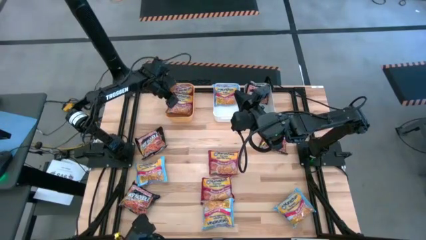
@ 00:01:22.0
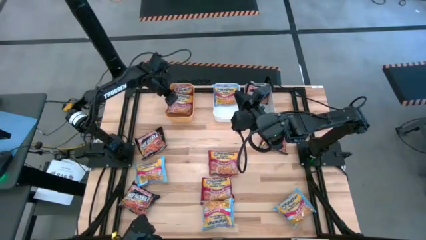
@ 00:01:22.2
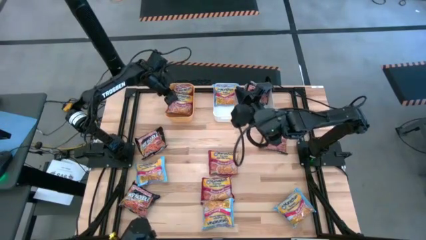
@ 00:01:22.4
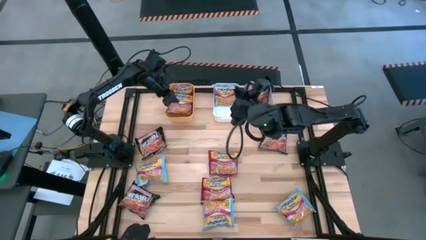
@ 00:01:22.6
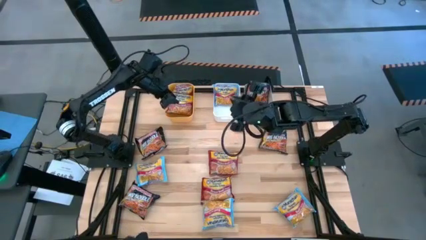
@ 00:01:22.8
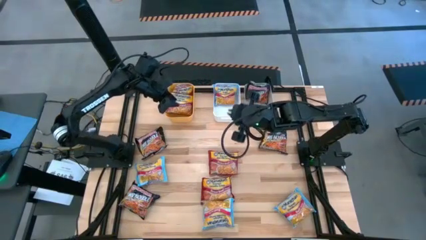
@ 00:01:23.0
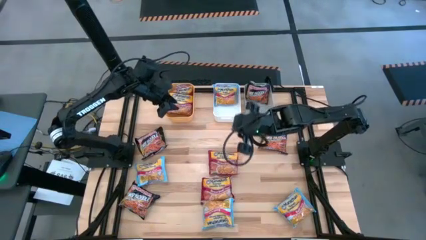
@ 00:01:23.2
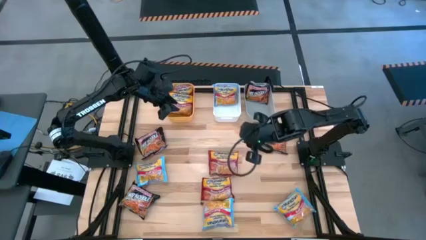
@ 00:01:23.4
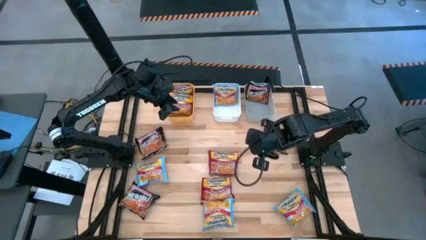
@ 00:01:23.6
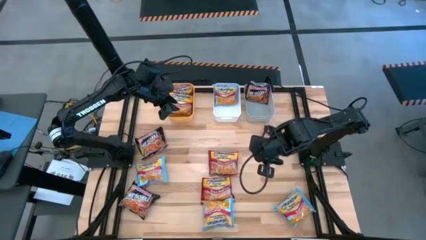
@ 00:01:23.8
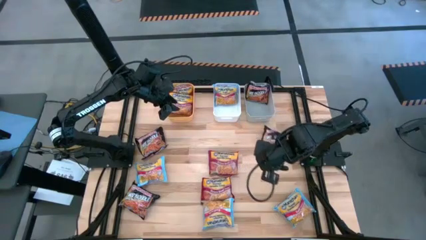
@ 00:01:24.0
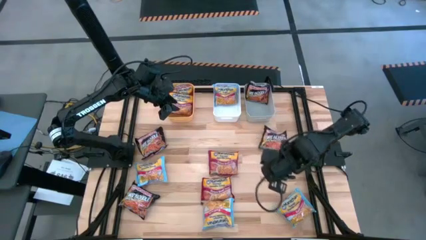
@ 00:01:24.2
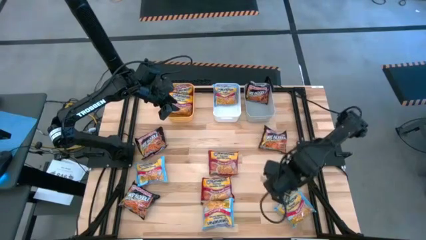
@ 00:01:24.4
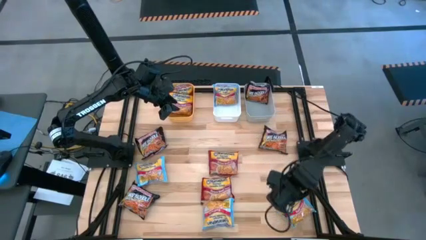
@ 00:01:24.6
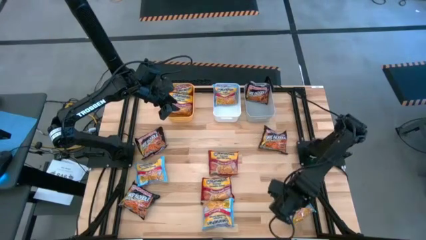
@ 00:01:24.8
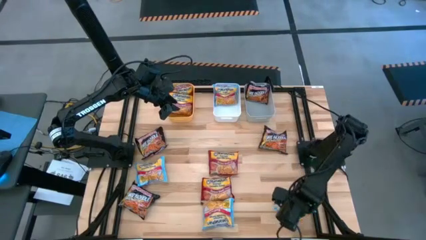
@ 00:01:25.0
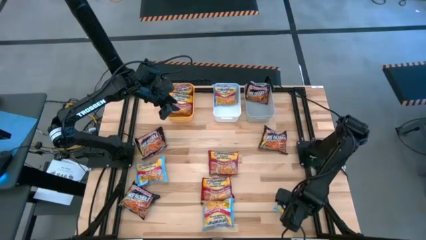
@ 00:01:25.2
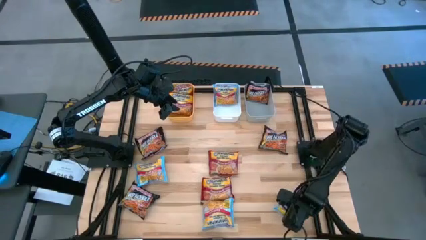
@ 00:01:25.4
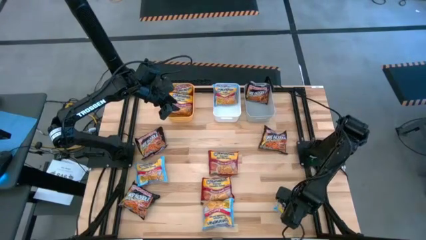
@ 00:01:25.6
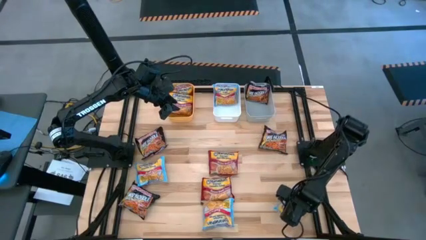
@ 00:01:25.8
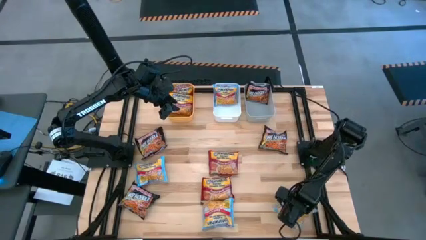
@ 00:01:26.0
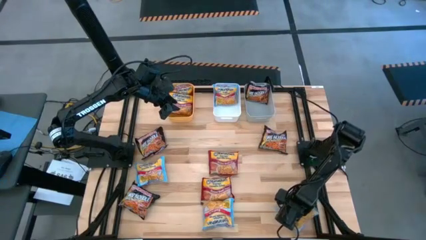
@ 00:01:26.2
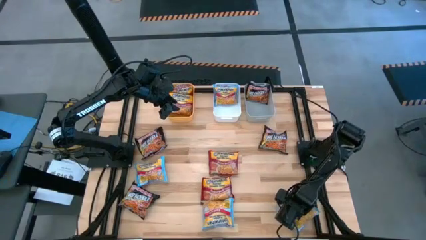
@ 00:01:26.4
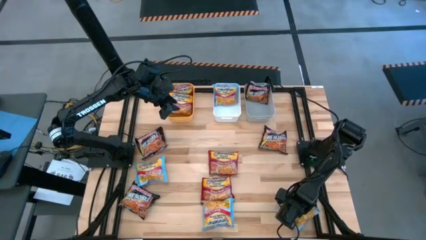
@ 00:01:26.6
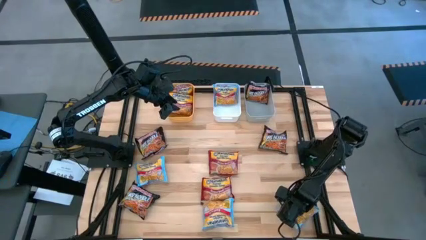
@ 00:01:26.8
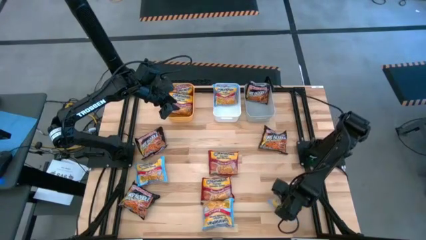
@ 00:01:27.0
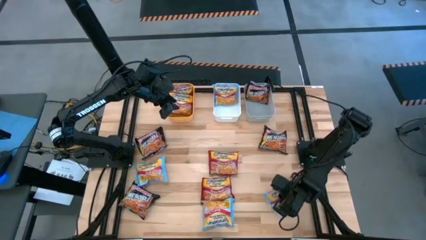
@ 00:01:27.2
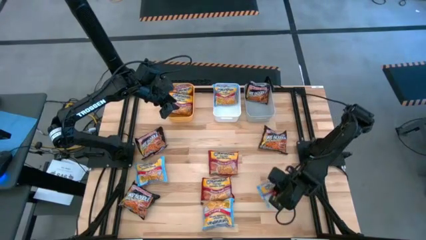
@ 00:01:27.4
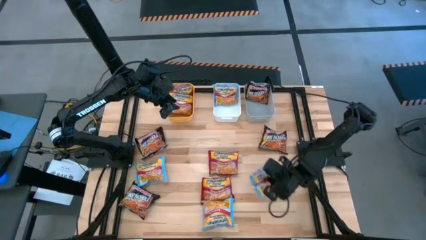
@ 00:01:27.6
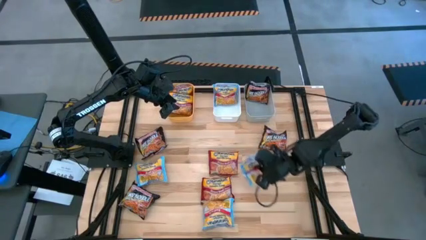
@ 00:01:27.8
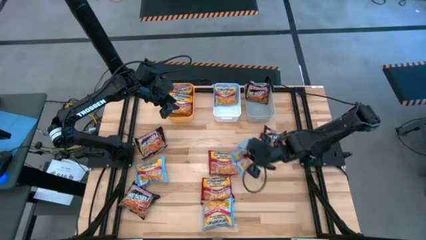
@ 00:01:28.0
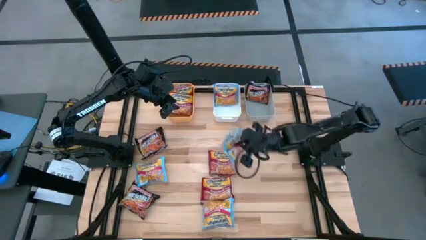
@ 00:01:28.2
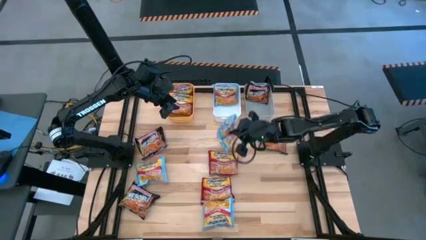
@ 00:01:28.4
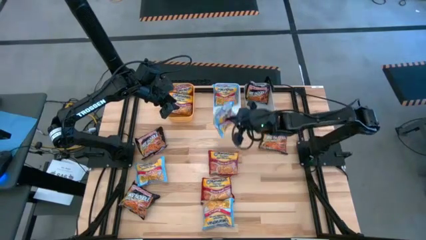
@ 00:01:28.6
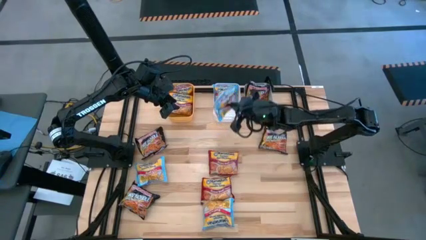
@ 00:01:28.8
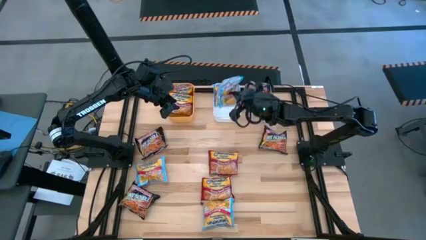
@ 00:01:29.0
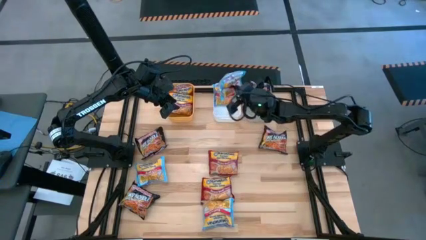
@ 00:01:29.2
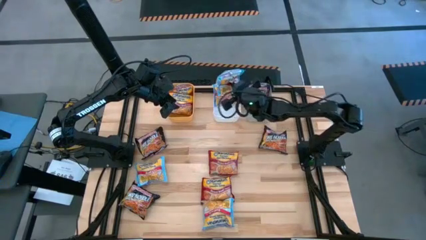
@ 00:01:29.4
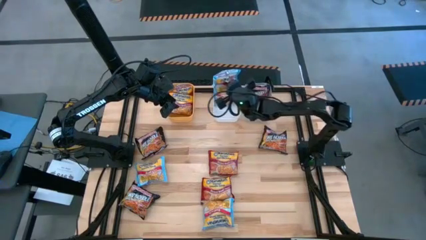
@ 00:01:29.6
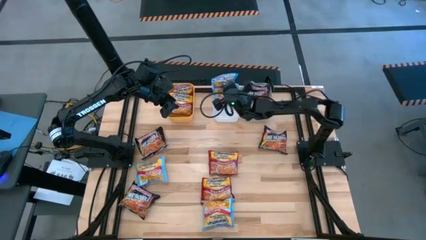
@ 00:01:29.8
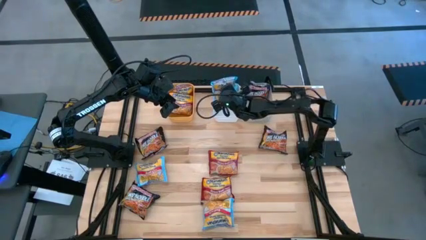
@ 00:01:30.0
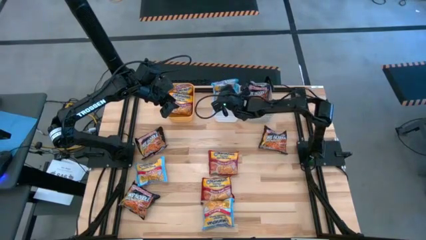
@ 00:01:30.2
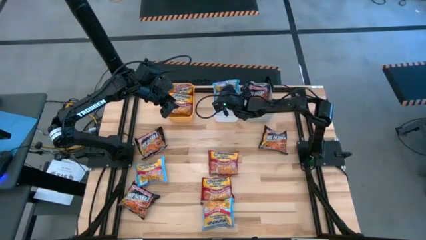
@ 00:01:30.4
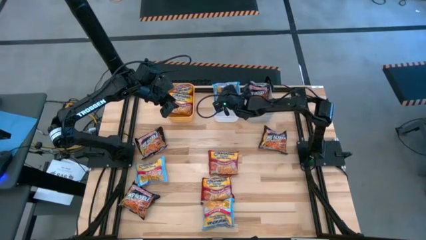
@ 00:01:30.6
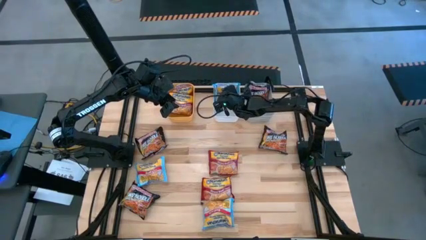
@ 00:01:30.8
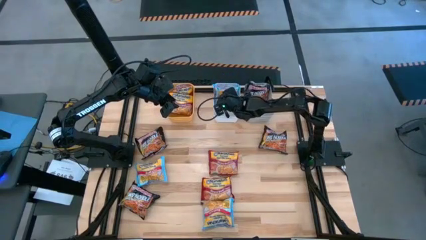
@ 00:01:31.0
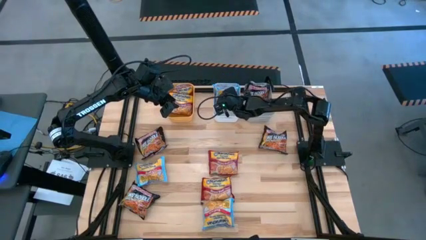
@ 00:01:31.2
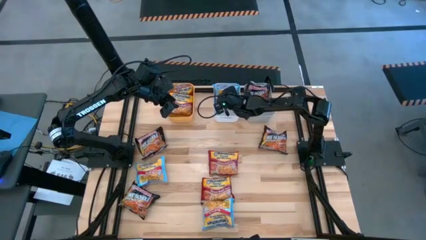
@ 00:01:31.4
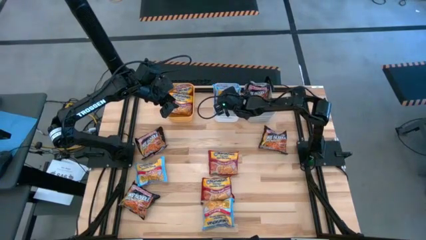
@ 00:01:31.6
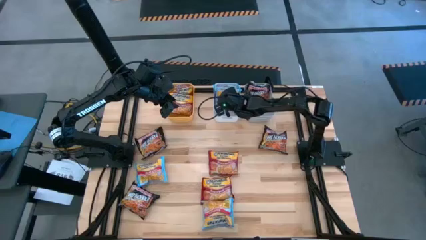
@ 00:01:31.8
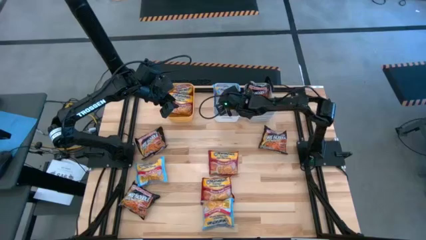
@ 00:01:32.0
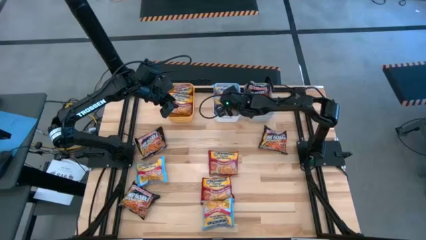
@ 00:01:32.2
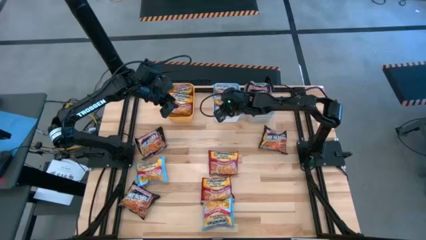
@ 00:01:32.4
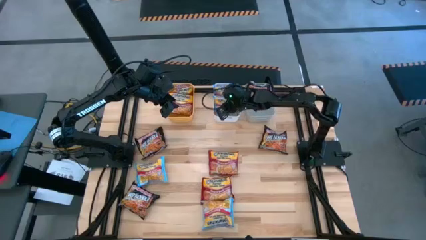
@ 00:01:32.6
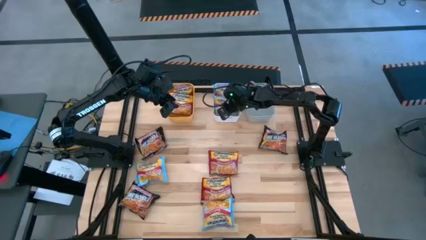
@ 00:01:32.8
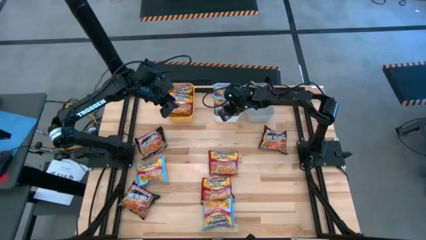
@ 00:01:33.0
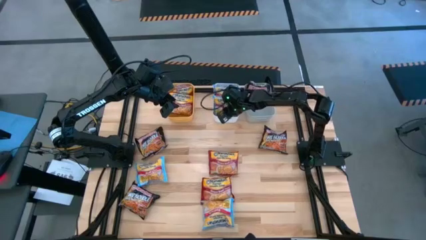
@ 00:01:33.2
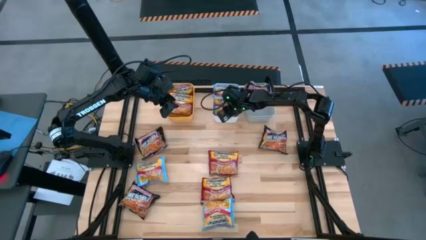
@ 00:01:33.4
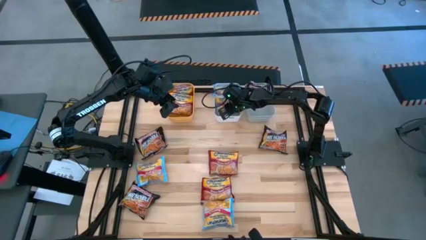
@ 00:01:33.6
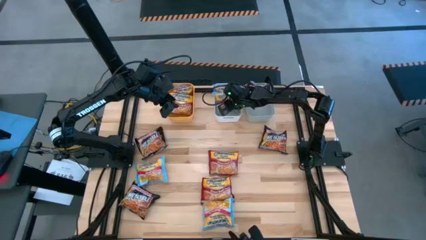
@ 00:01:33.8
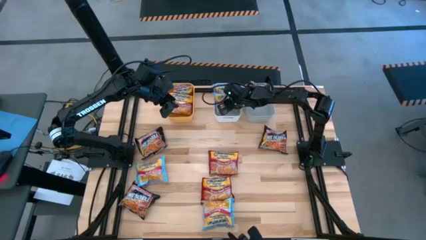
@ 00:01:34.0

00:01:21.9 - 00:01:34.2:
Task: Sort Maruchan noodles
Put the blue noodle pack into the white bin

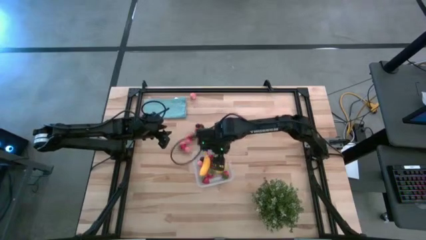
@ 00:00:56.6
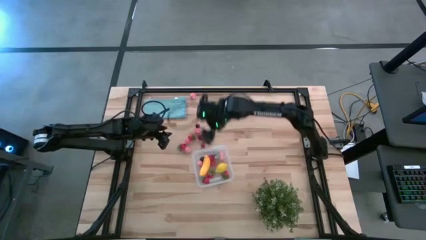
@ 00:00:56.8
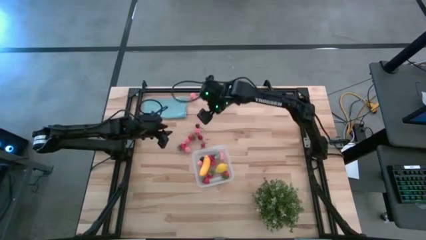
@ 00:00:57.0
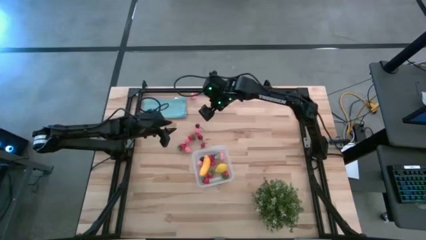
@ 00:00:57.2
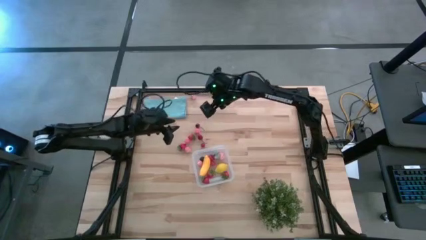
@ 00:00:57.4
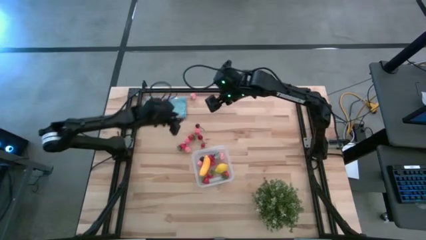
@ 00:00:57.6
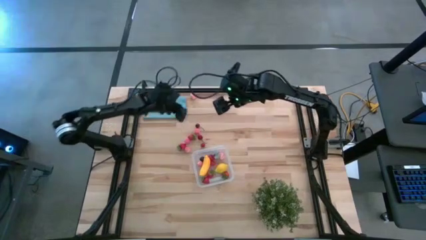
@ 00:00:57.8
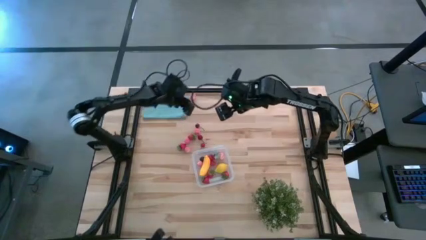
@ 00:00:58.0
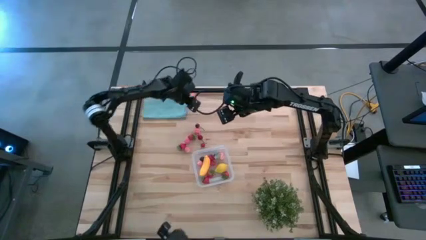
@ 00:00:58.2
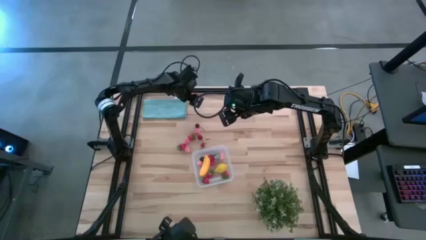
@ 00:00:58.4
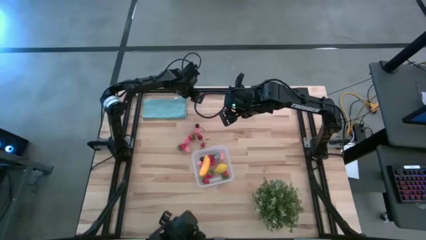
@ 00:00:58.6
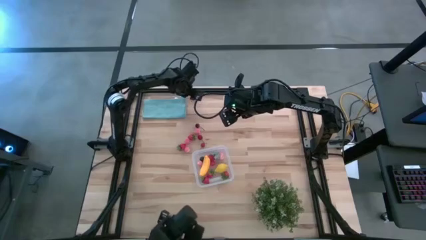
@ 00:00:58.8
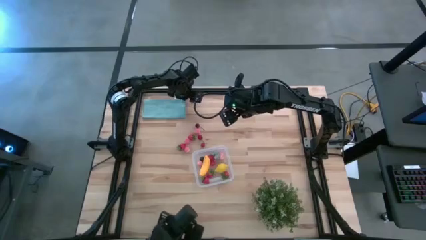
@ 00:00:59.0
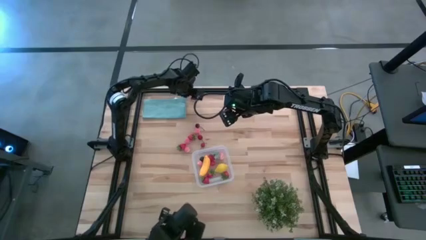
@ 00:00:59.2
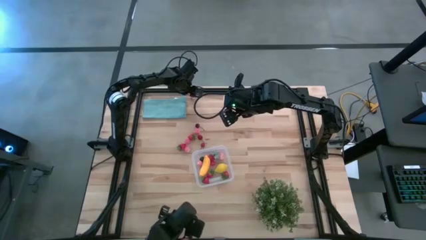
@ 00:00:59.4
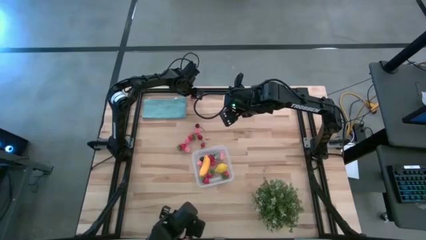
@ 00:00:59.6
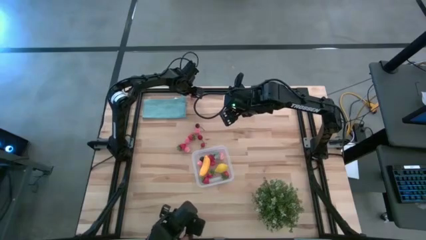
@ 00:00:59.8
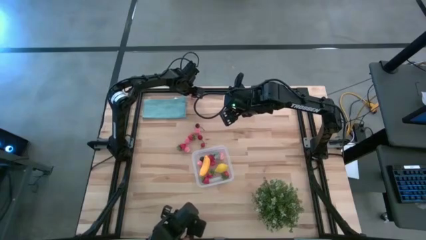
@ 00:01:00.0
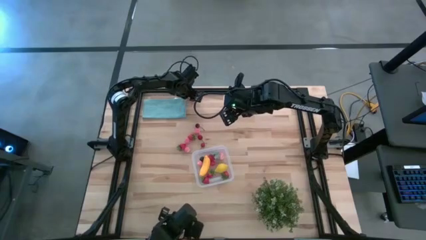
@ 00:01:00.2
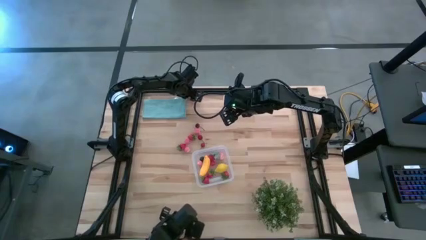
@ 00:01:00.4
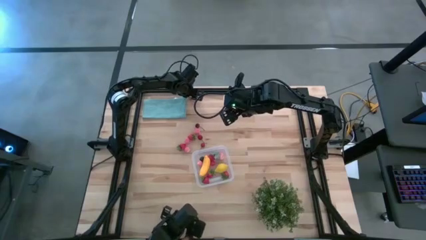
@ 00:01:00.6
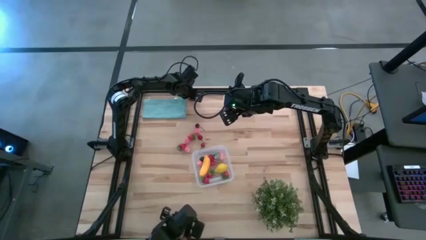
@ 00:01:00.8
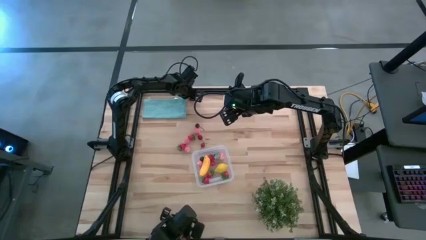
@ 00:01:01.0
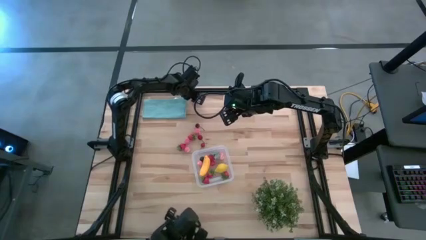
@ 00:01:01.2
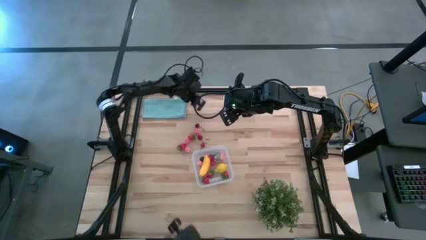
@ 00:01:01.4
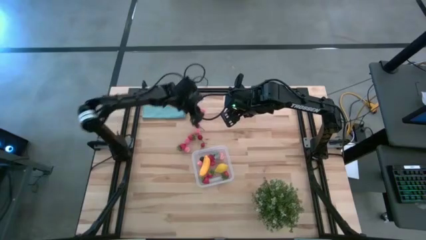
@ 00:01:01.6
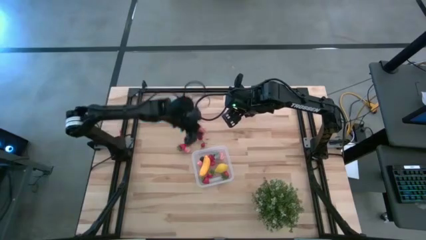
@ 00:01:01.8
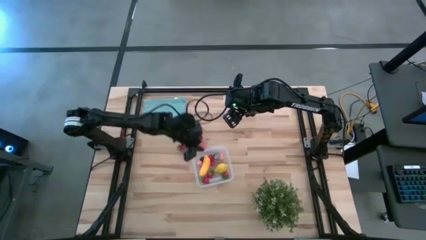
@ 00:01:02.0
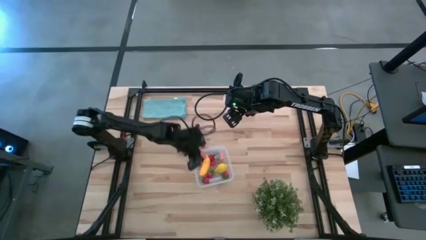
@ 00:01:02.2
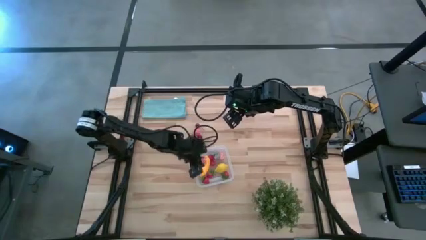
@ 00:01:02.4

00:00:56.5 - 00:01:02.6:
Task: Pick and placing Produce into tupperware
Put the pink peach into the transparent bin
